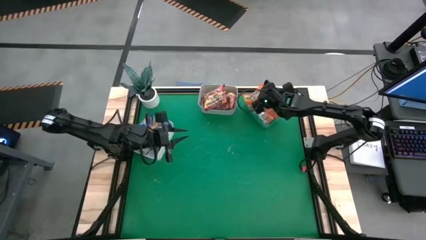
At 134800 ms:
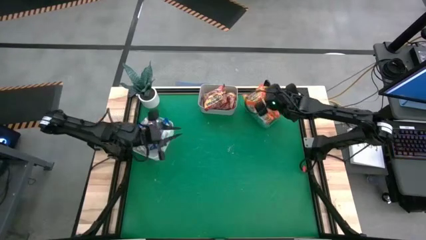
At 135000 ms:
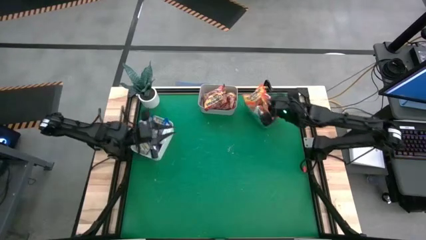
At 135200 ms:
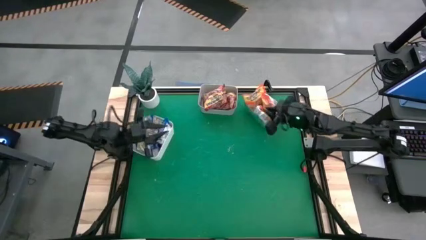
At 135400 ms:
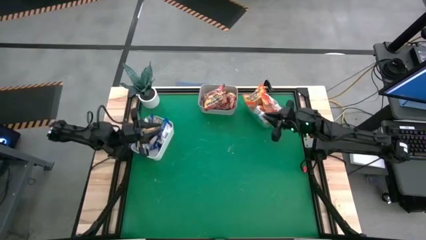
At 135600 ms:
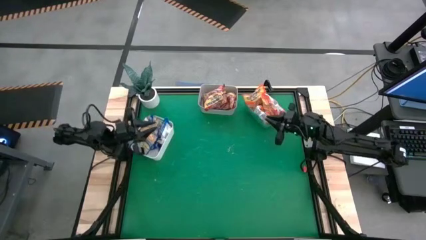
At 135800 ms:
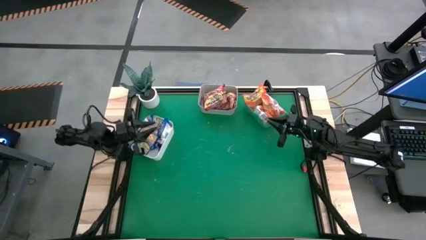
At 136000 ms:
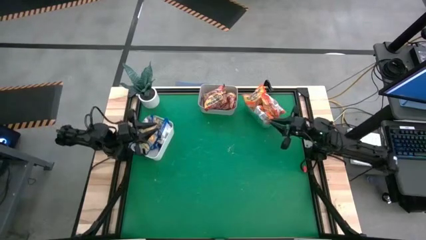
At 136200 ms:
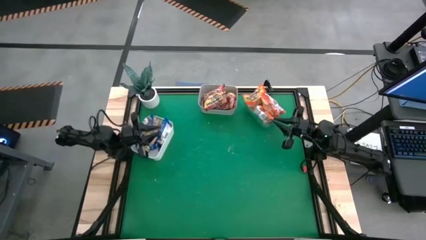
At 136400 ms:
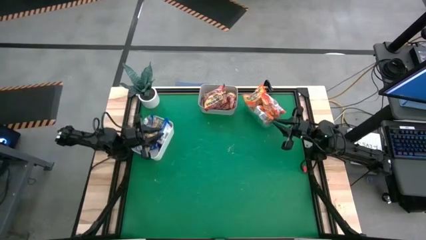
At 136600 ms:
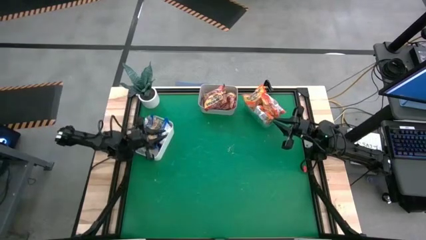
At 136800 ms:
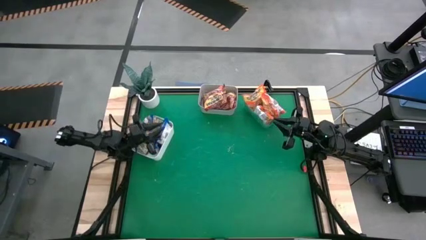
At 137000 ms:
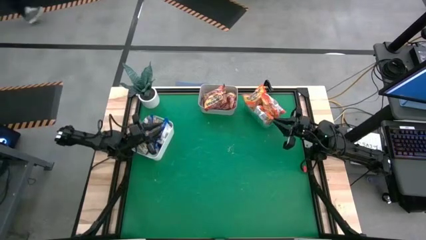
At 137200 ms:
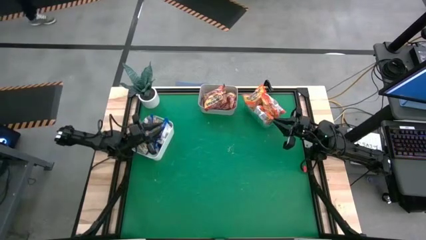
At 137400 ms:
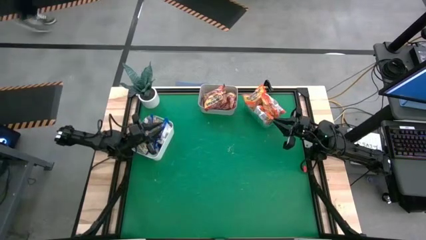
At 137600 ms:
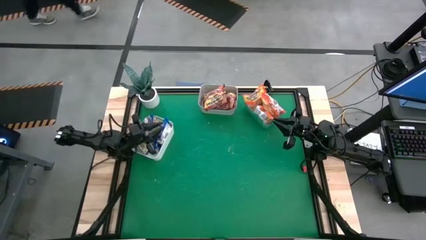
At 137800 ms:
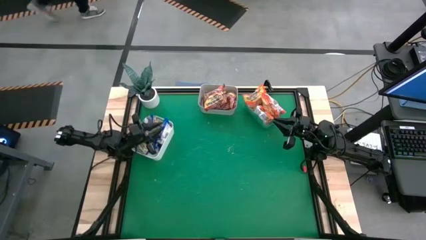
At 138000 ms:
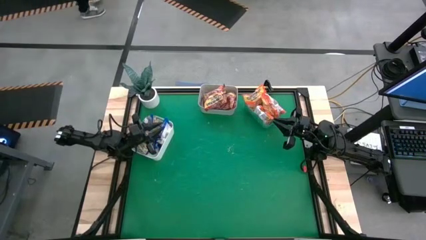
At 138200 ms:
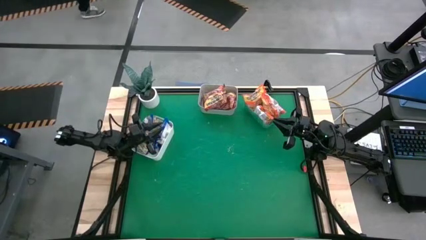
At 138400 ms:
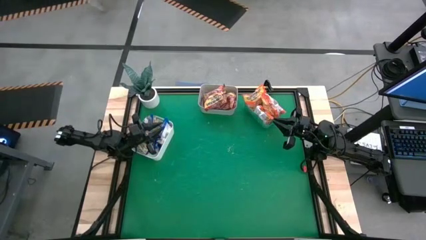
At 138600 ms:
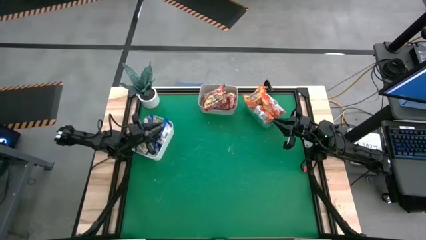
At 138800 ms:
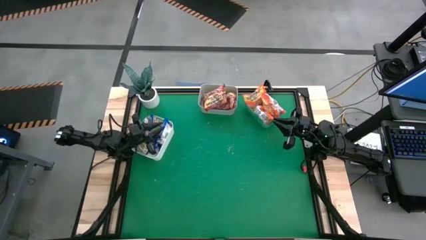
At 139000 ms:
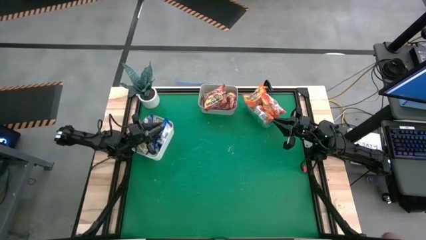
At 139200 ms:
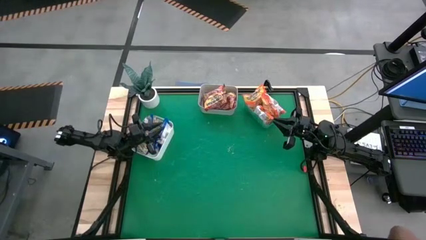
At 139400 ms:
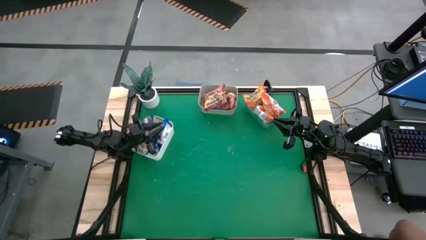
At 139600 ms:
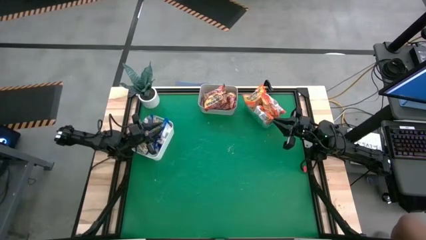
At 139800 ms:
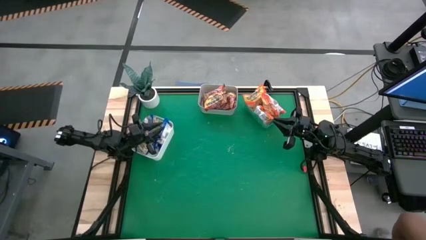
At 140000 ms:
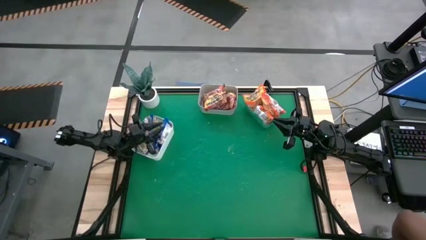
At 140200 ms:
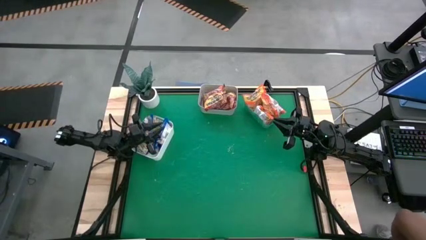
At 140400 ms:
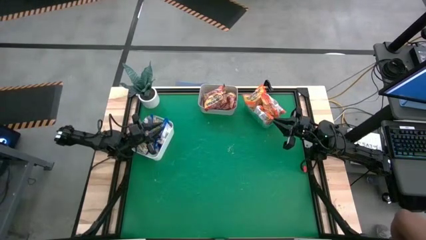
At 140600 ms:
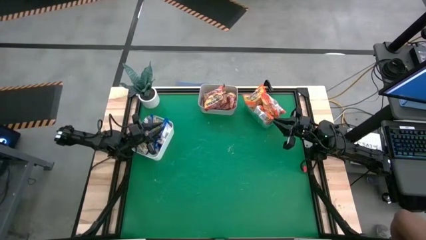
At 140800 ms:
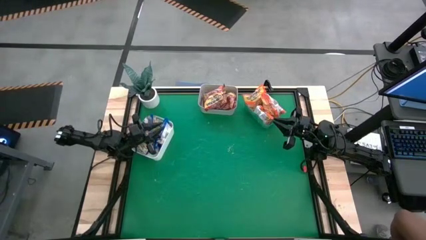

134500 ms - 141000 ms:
Task: Sort Maruchan noodles
Return to Home Position

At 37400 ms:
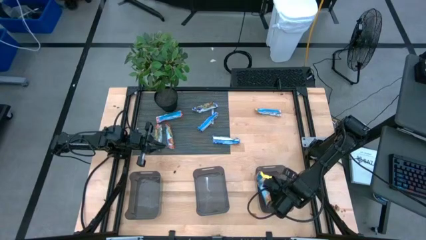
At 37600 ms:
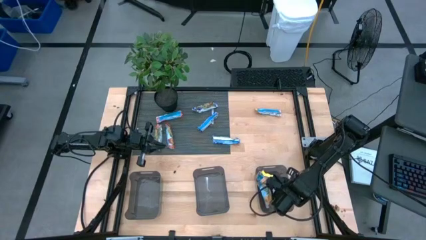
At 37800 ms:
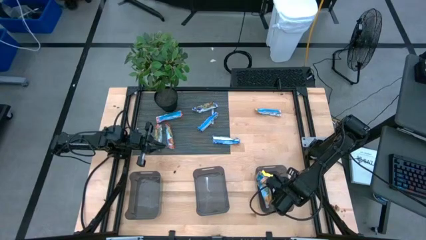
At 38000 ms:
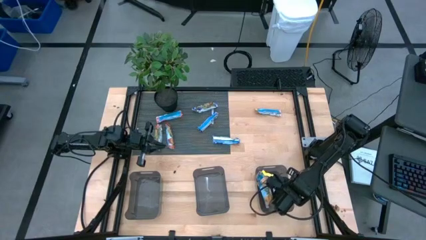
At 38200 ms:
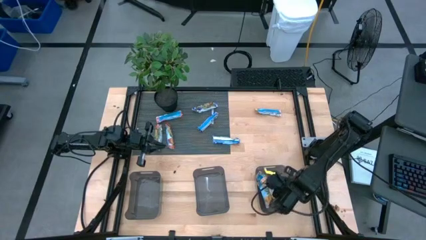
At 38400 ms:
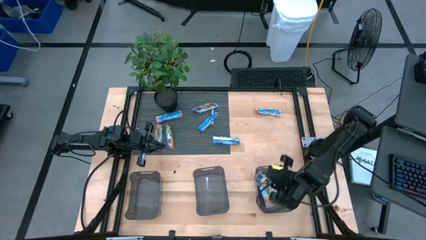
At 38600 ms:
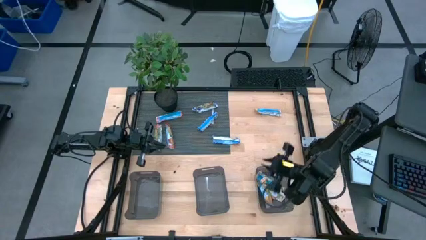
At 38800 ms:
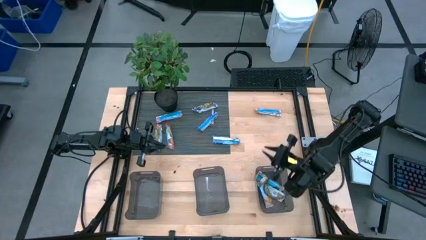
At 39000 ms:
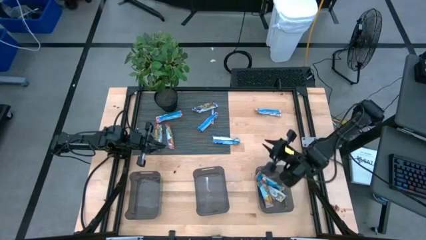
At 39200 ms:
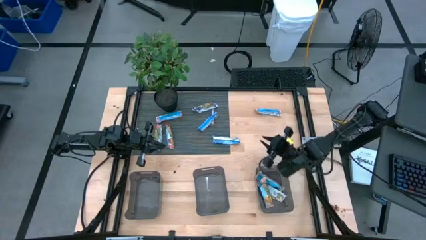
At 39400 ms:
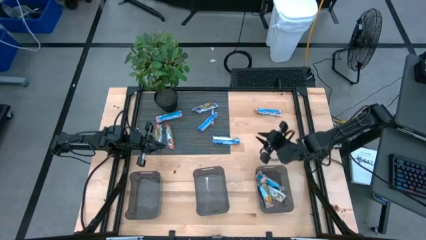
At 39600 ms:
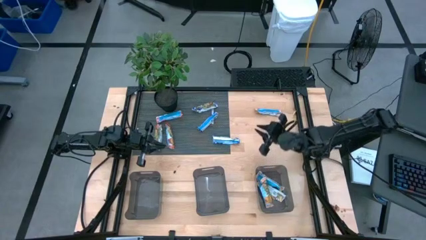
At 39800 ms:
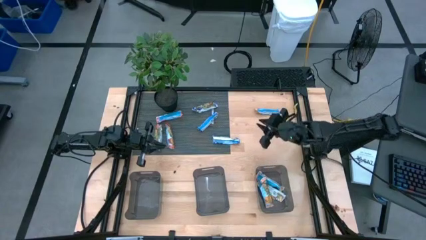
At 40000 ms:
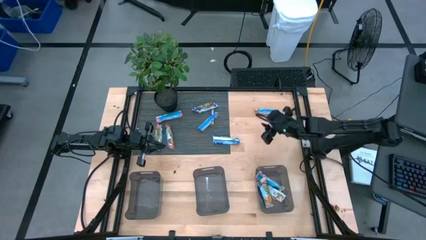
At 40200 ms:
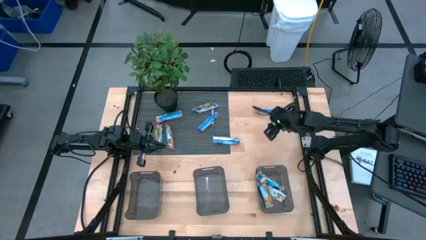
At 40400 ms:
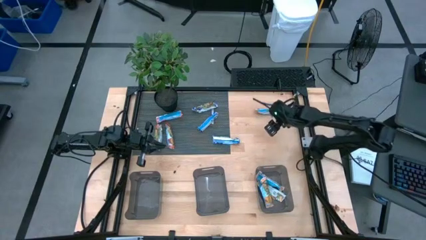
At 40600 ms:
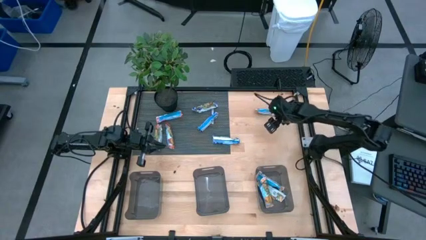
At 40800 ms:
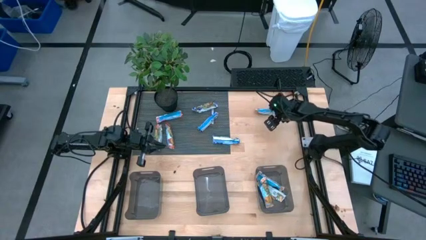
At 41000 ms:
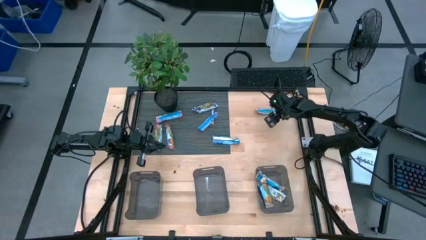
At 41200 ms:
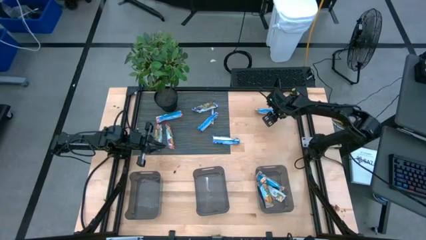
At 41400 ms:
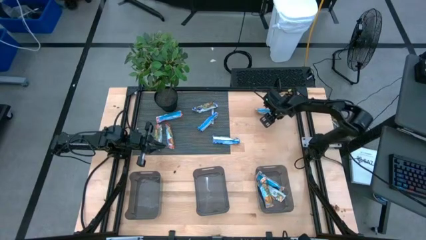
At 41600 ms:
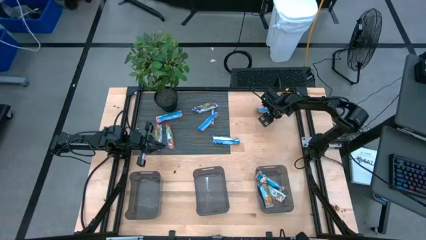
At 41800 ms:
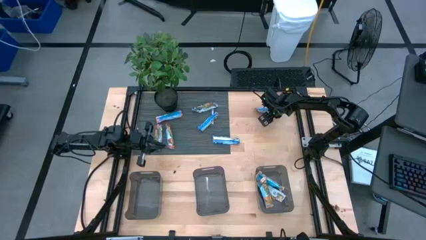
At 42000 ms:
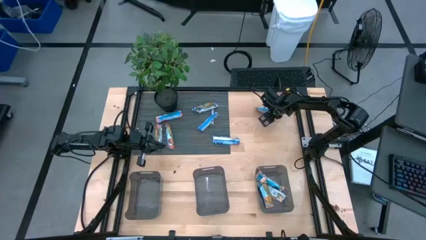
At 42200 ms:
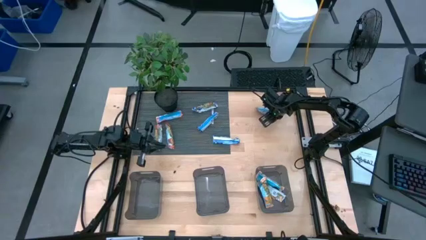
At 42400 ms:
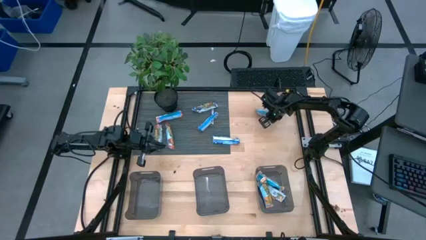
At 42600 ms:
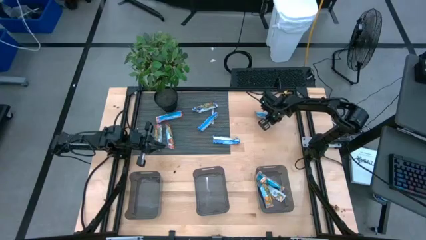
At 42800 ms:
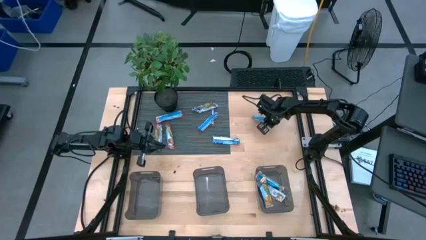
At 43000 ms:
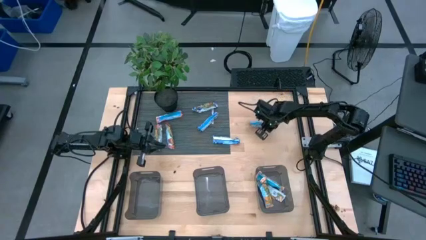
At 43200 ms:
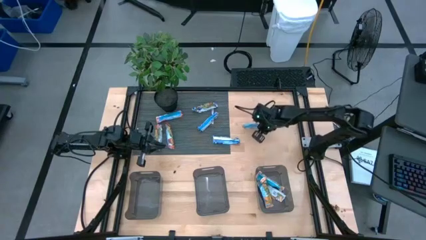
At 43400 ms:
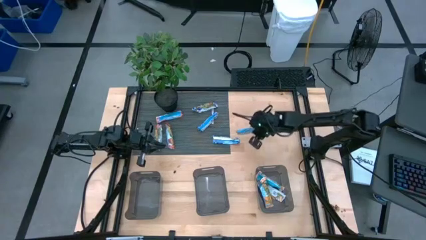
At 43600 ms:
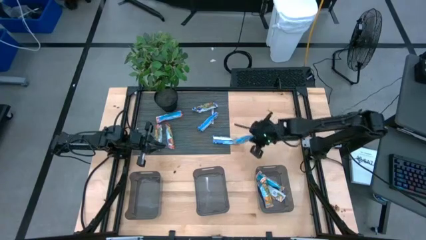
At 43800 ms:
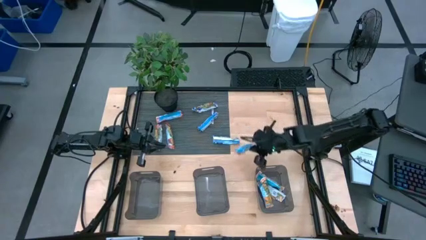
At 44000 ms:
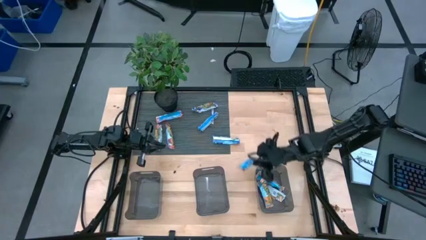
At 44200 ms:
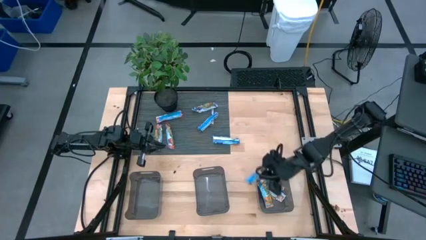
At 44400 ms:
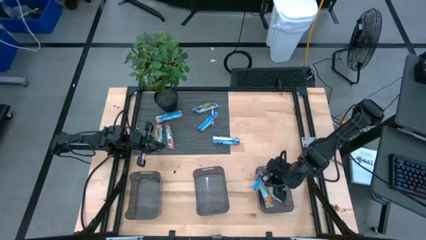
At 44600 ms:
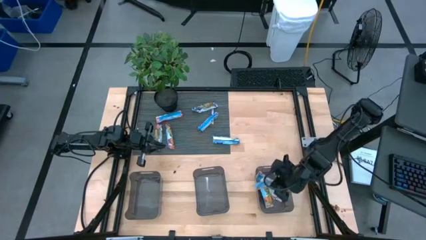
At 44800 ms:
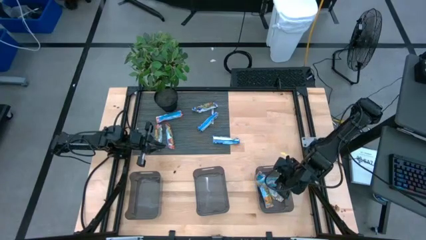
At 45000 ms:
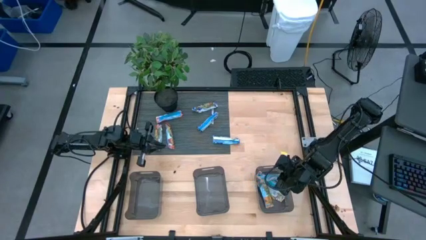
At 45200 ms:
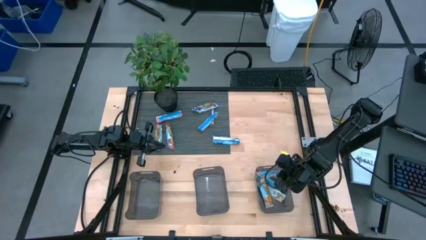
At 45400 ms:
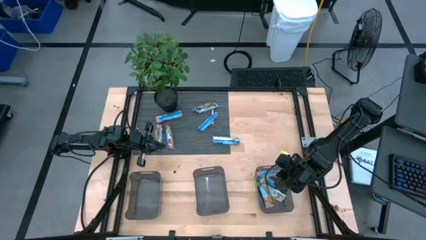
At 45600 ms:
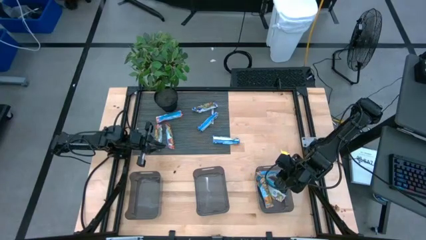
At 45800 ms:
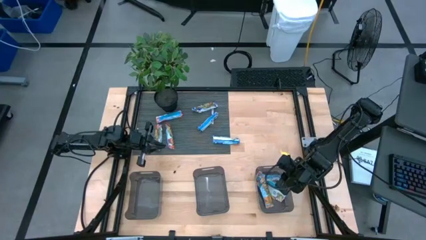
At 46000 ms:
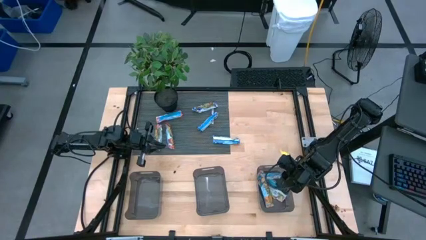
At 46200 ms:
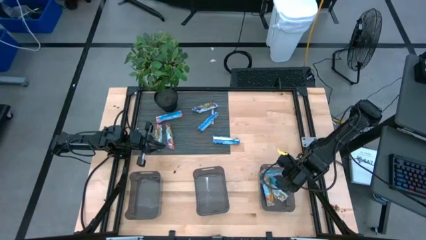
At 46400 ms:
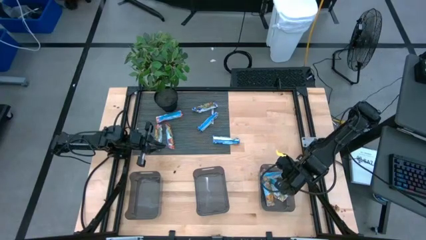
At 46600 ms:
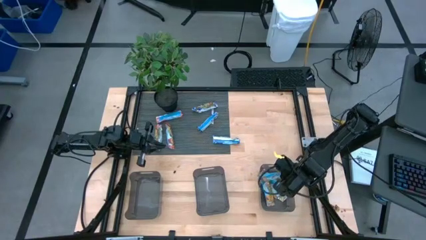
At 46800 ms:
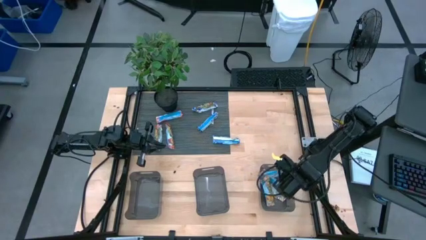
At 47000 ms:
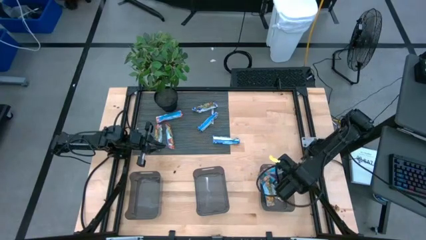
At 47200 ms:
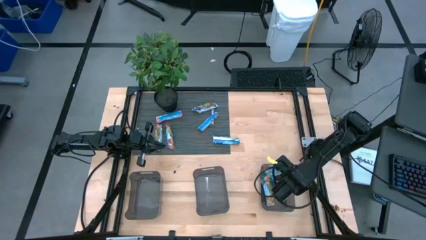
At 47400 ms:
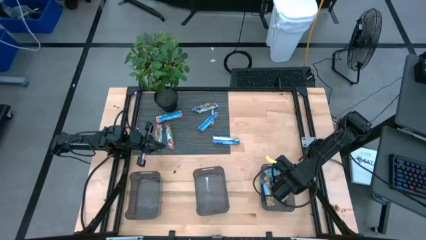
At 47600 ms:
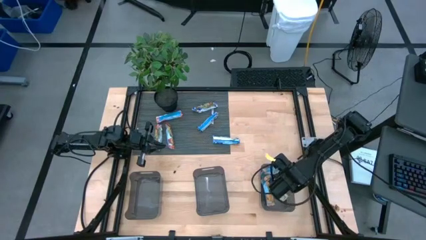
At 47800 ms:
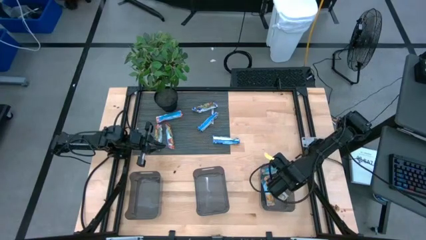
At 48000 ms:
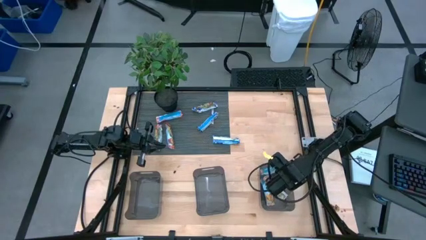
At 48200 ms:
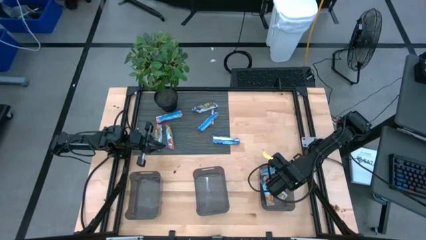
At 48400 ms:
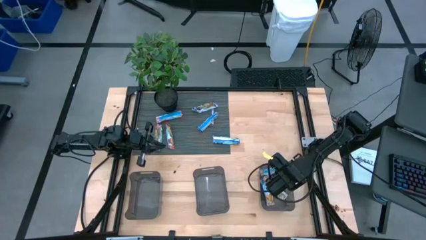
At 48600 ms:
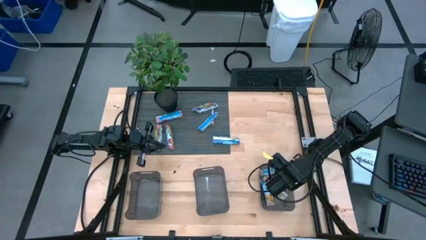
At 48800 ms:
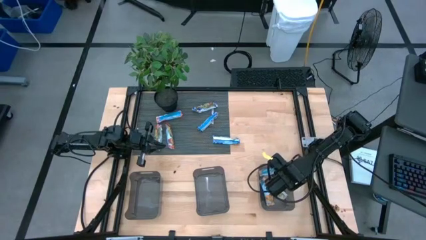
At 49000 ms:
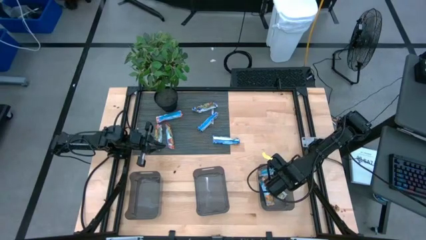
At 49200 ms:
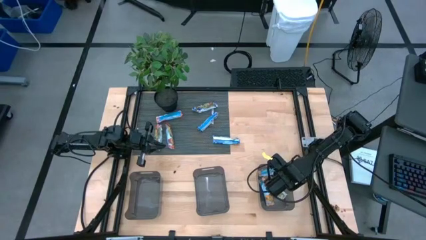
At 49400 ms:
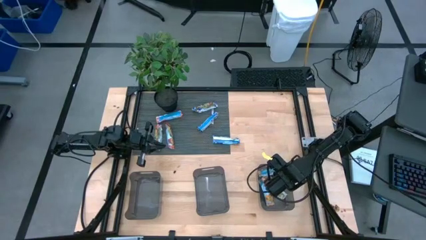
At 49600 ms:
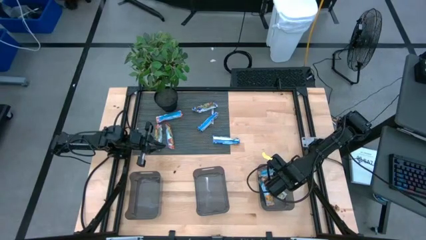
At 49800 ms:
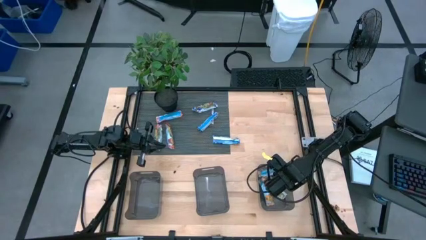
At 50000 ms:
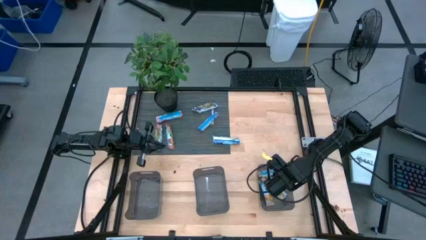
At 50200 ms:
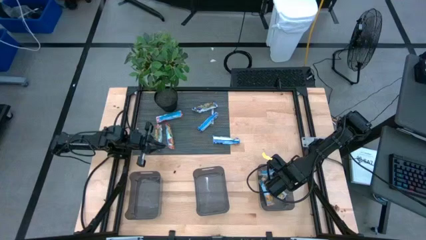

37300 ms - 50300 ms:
Task: Pick and place Granola Bars by type
Put the yellow granola bar into the right black bin
